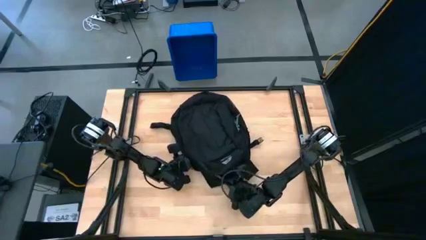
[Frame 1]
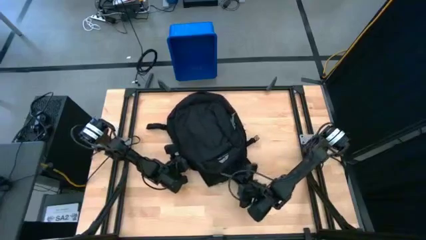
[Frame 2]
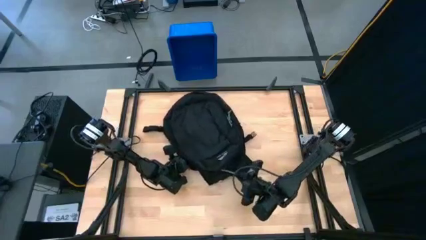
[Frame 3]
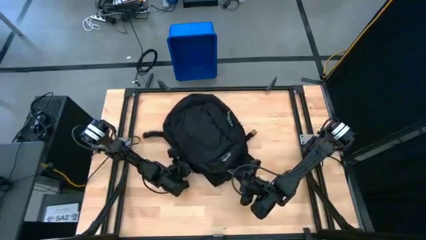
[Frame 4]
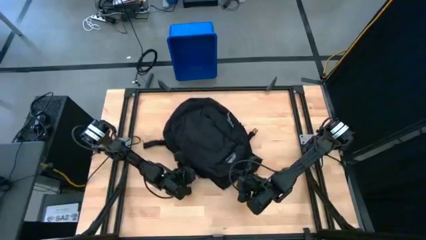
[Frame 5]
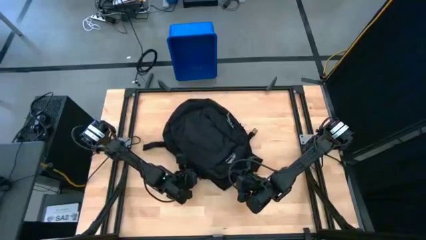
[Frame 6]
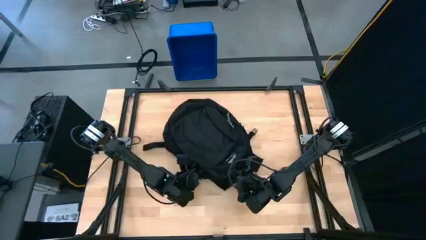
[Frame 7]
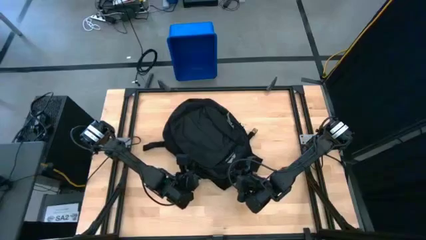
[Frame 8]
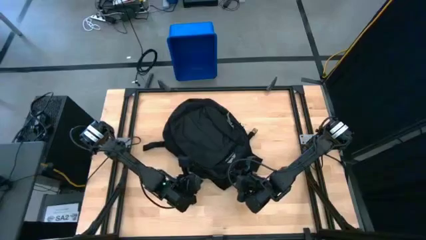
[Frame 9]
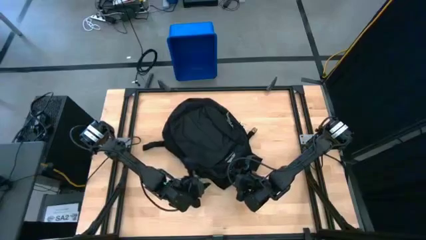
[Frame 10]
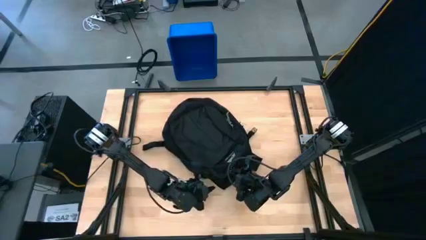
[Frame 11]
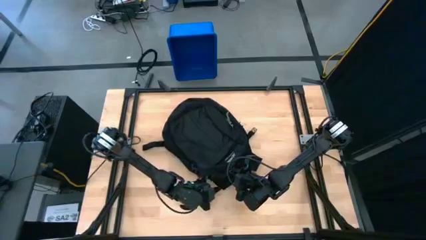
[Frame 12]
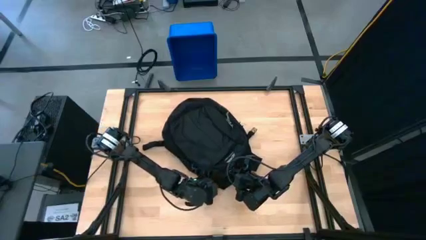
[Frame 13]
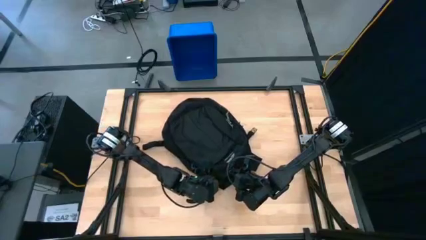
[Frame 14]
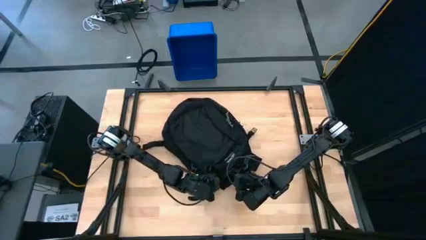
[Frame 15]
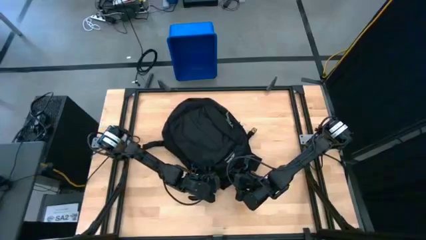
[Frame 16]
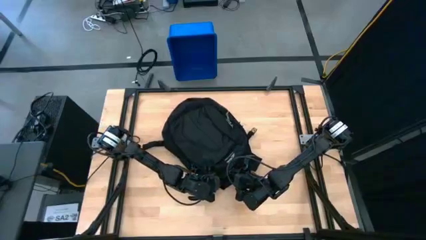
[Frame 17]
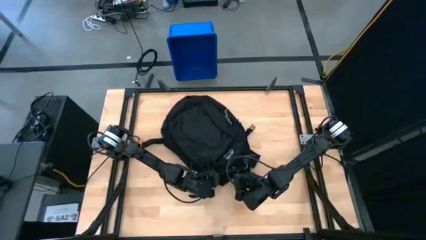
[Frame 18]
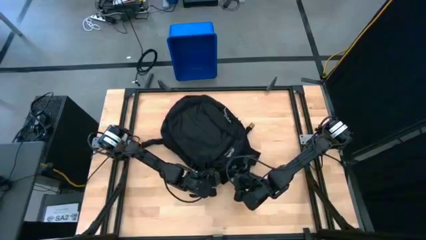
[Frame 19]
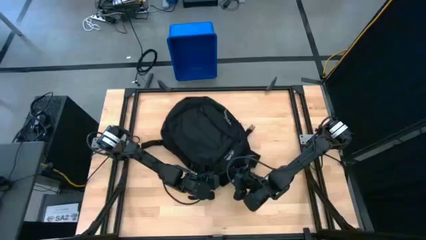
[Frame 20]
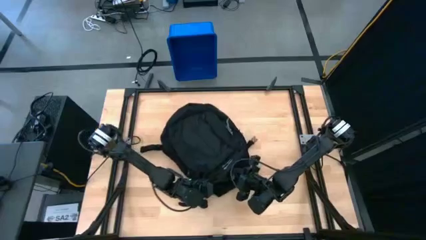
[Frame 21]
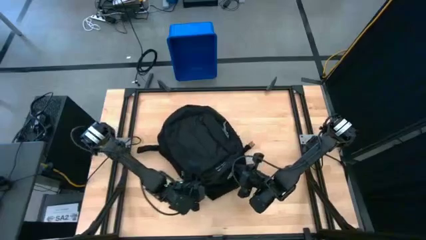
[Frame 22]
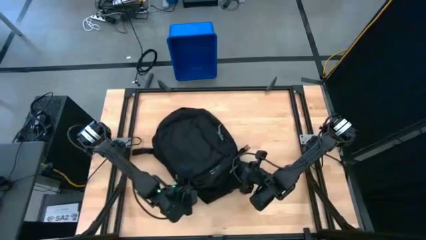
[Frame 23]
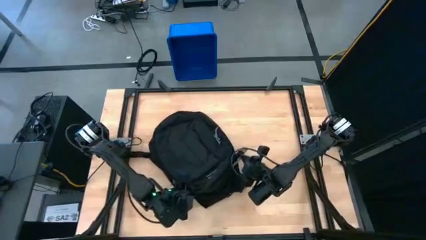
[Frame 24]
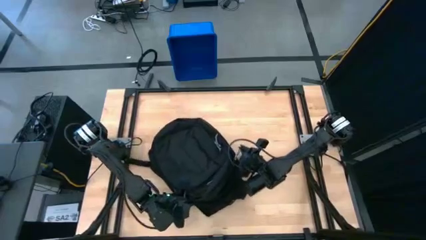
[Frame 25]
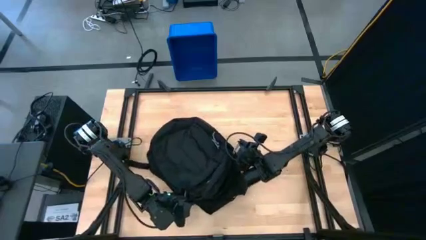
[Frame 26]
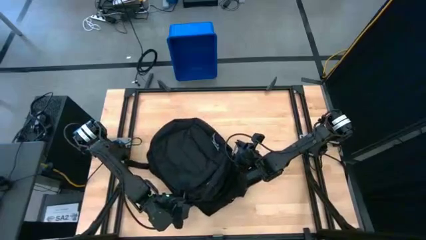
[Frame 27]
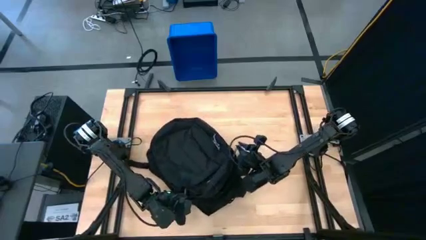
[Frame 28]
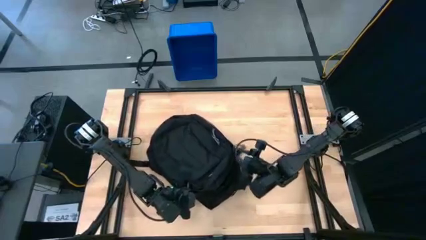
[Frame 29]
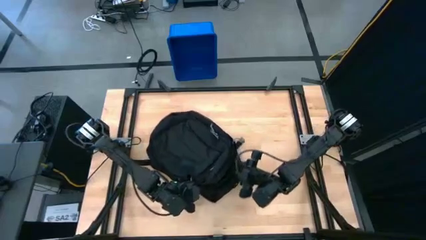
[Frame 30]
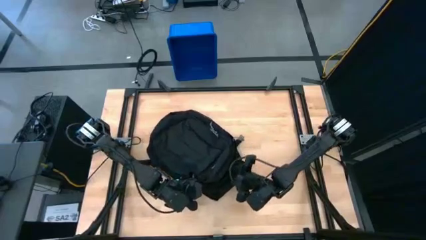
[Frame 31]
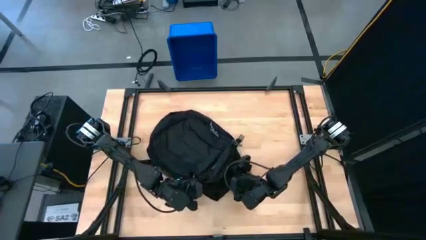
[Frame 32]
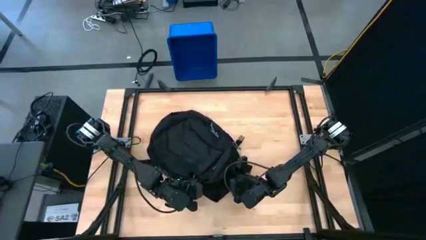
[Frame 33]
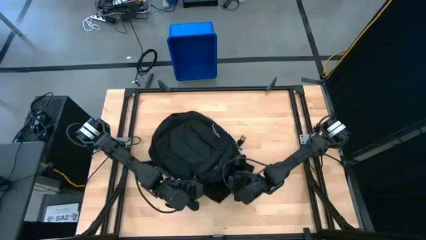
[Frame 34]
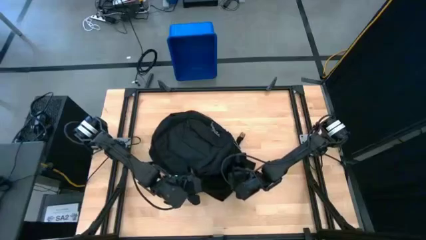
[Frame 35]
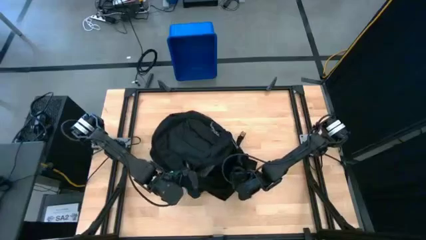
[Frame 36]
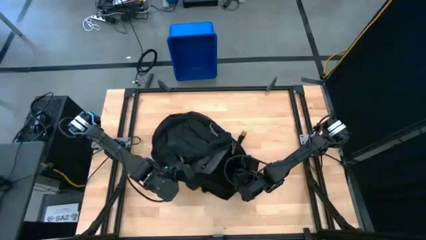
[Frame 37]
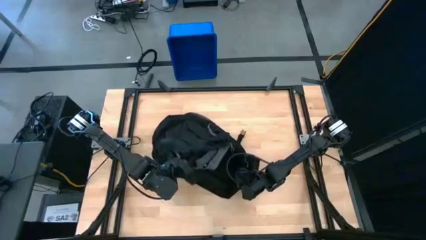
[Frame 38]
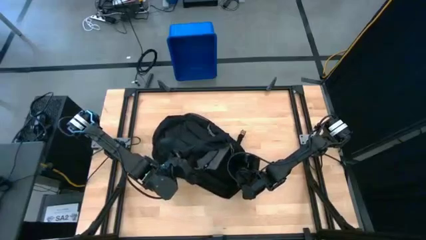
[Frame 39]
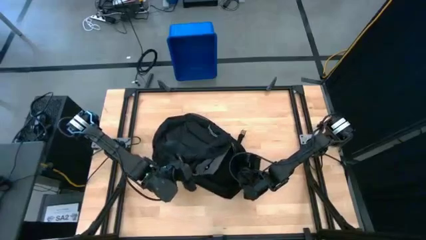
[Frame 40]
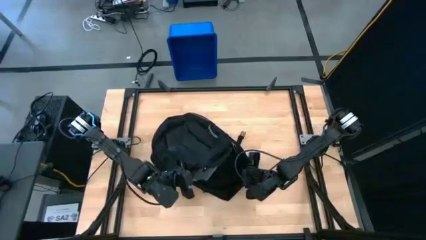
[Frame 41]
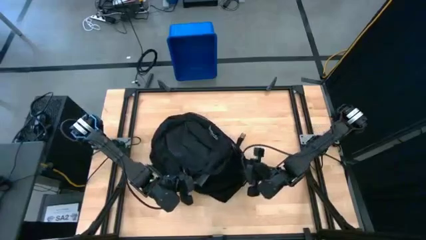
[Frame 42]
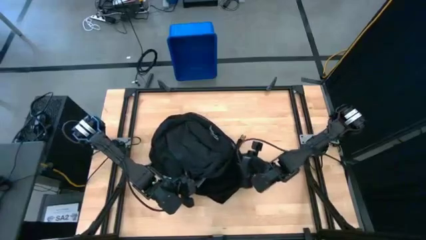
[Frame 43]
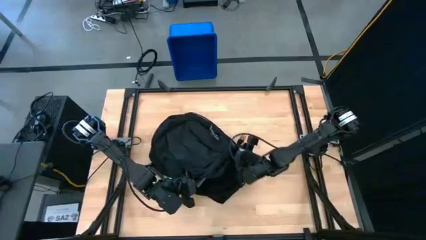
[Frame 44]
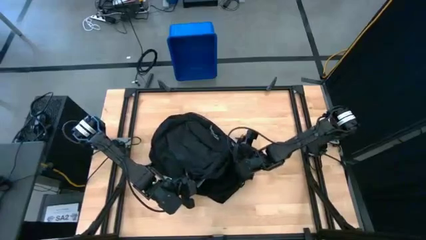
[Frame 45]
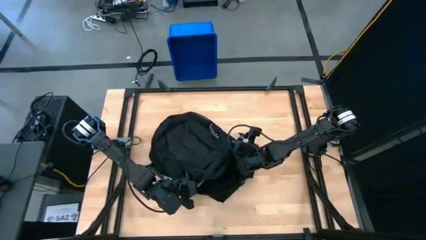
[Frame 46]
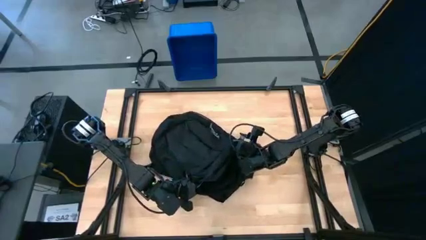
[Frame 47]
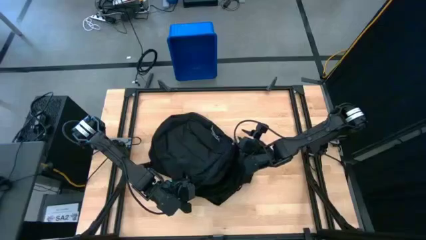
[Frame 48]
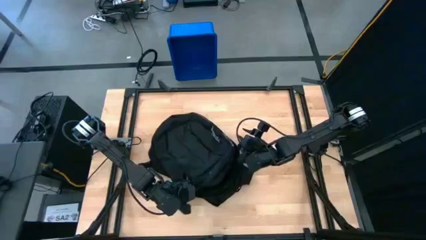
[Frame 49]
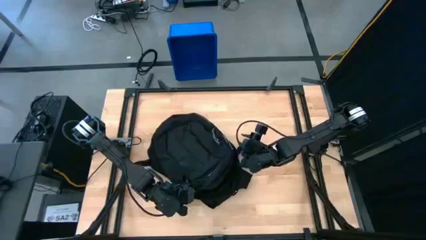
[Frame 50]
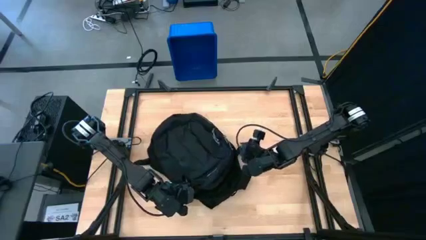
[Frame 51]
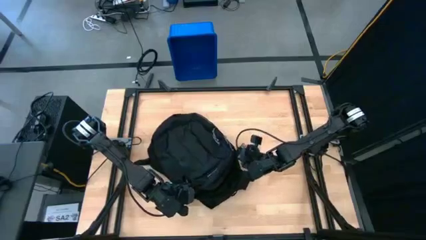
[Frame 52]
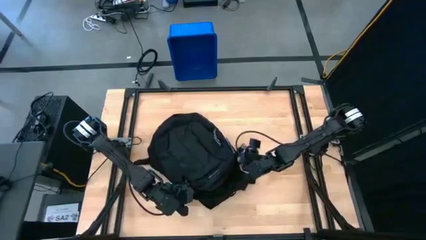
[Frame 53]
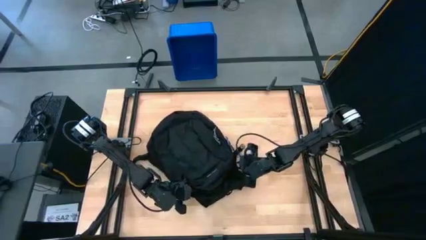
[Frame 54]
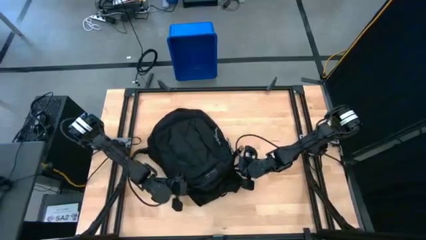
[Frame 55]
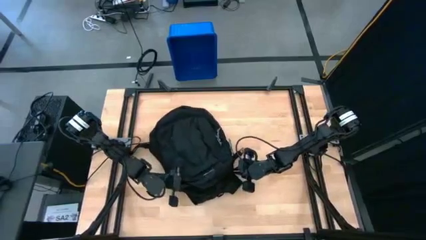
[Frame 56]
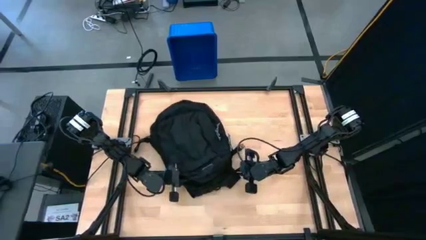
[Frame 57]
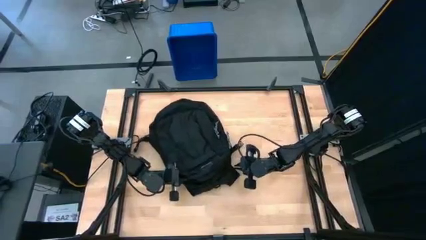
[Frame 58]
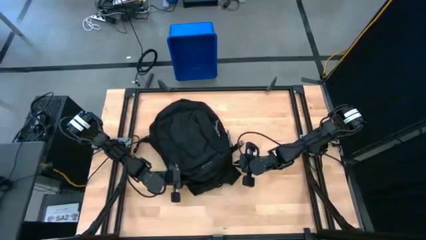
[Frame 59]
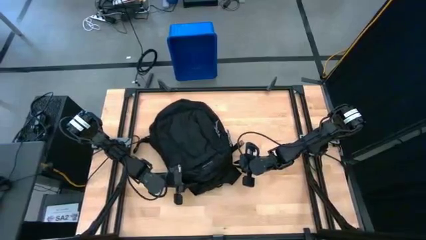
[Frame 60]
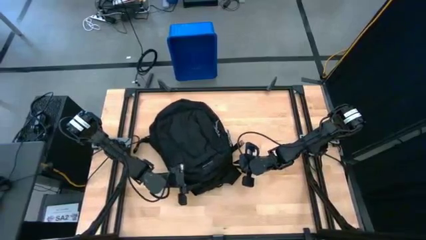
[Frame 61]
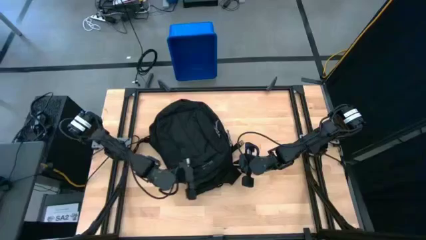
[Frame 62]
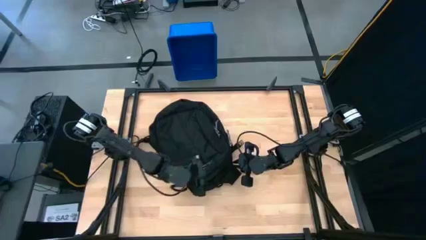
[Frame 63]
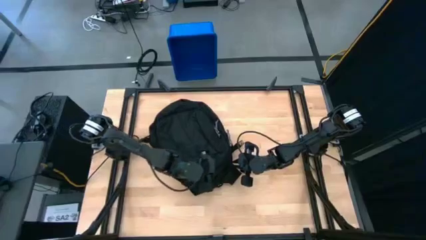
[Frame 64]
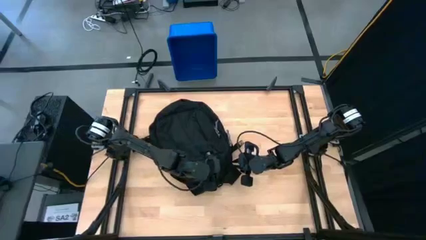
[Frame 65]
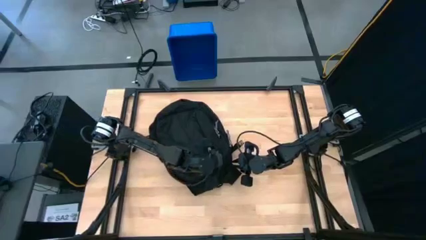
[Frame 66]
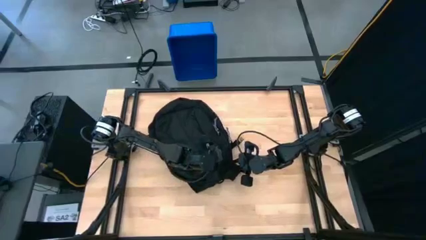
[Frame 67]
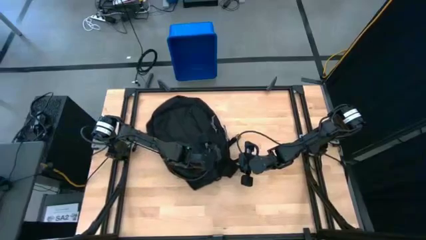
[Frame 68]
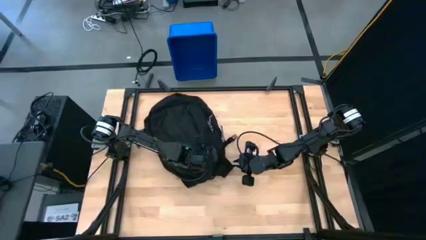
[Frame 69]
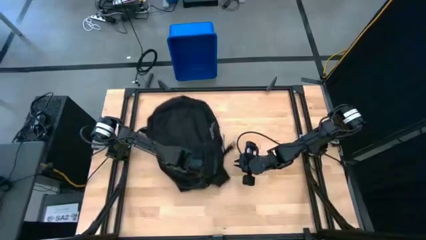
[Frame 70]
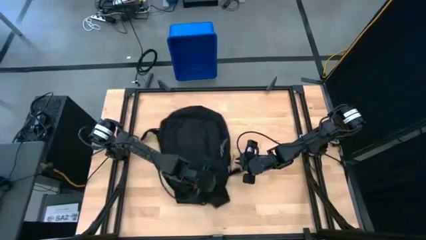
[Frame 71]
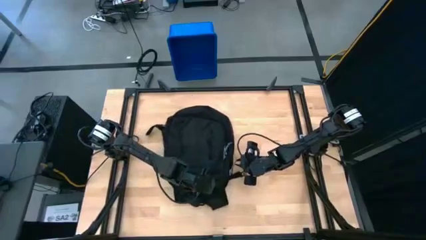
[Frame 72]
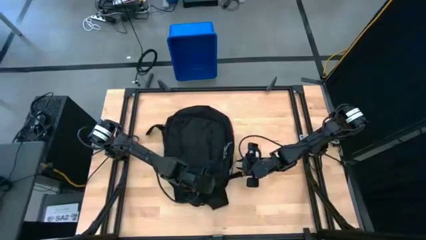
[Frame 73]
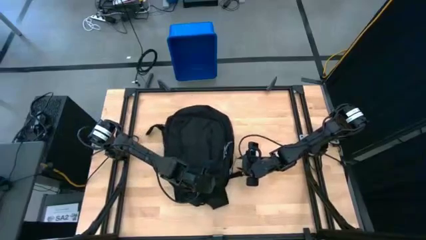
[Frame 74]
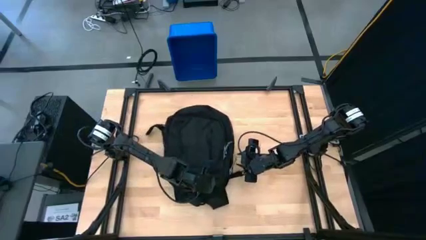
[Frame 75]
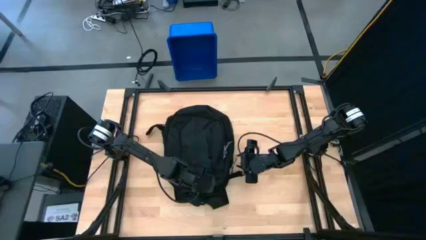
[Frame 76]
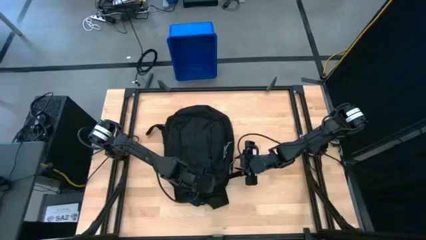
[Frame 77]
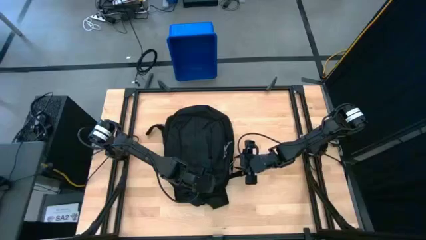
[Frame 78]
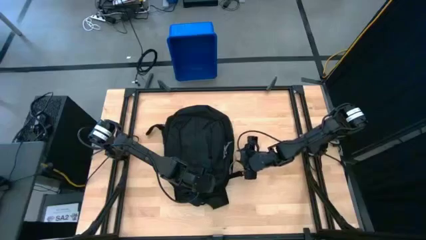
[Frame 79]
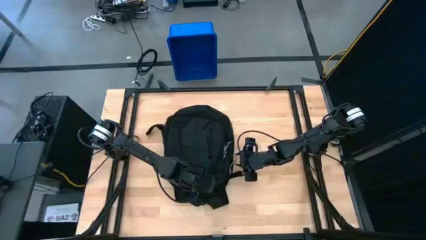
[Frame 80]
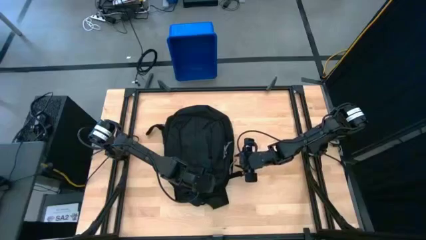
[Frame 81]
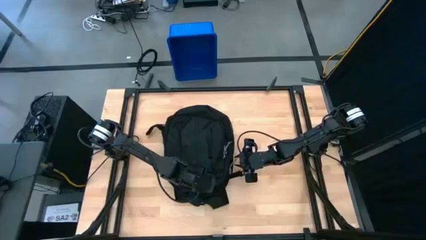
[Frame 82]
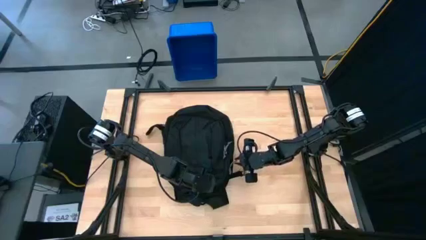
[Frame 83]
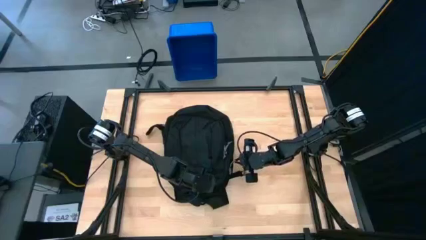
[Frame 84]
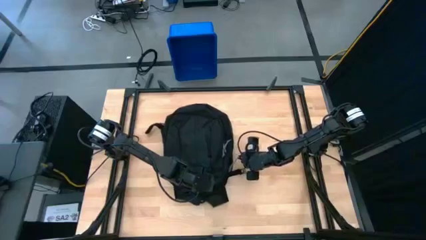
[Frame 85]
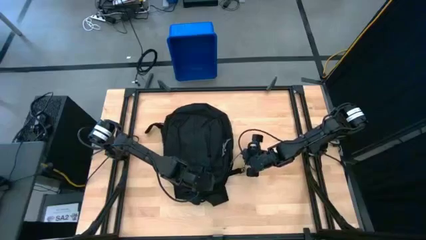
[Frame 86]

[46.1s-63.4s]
Task: Unpack backpack
Open the backpack
